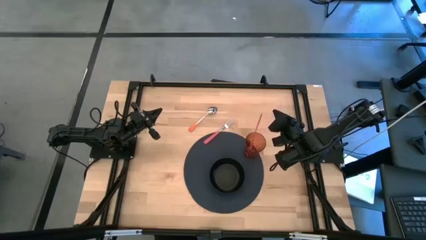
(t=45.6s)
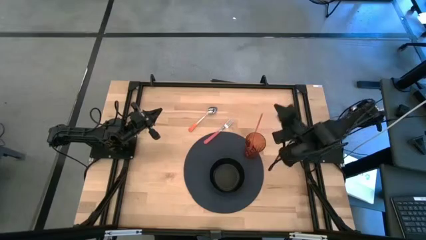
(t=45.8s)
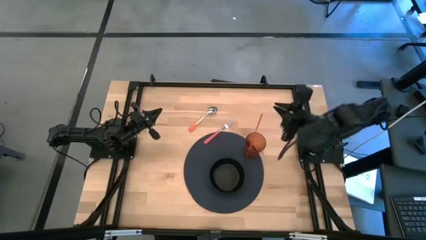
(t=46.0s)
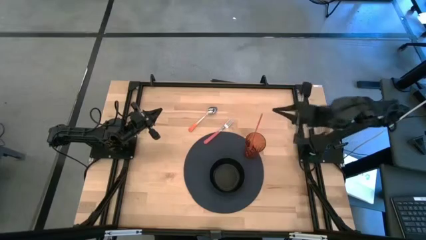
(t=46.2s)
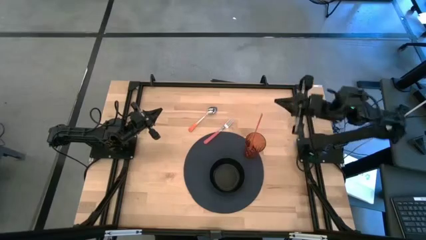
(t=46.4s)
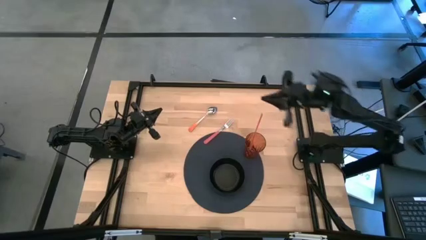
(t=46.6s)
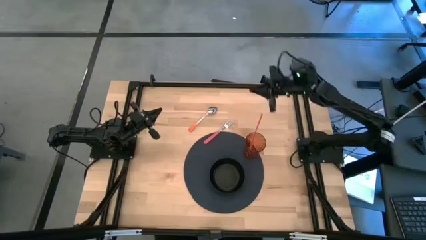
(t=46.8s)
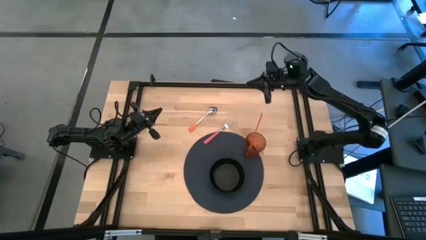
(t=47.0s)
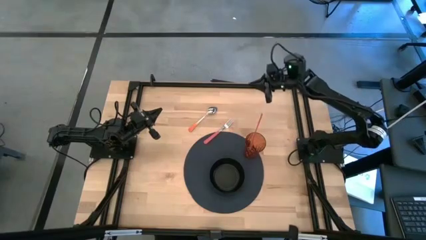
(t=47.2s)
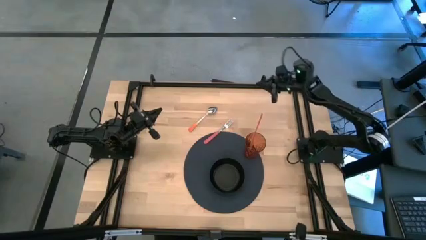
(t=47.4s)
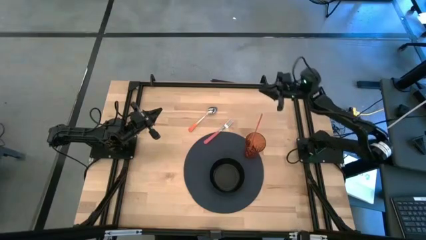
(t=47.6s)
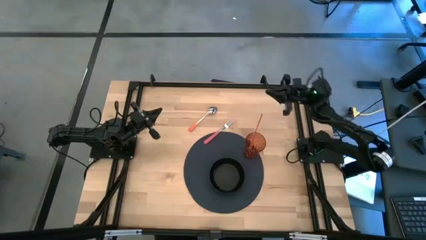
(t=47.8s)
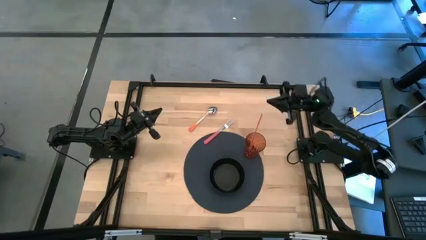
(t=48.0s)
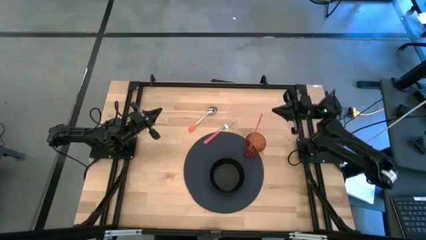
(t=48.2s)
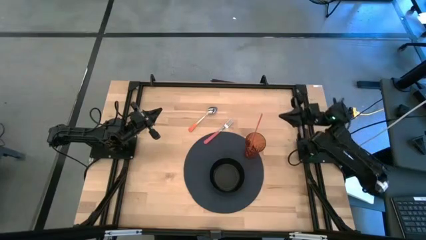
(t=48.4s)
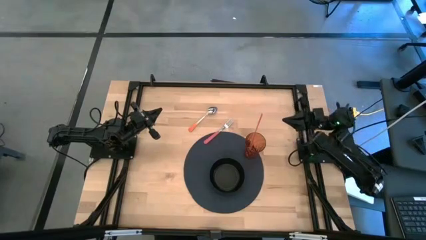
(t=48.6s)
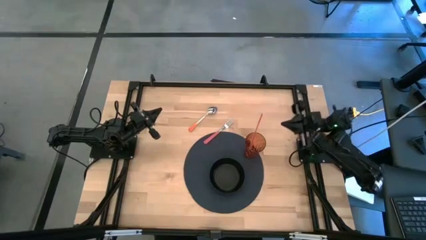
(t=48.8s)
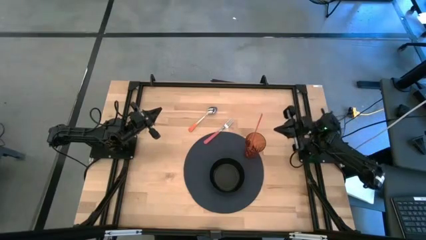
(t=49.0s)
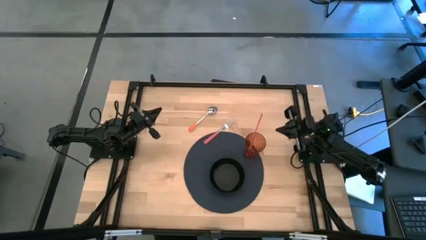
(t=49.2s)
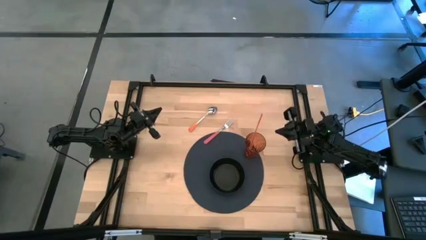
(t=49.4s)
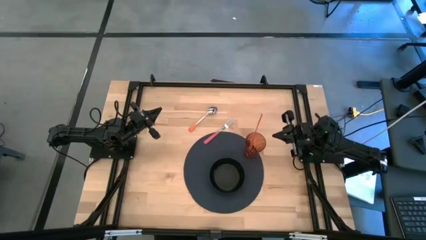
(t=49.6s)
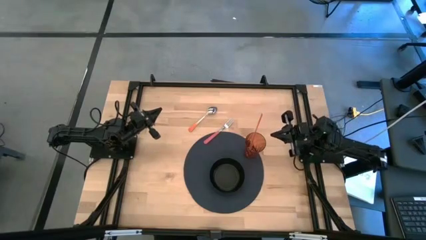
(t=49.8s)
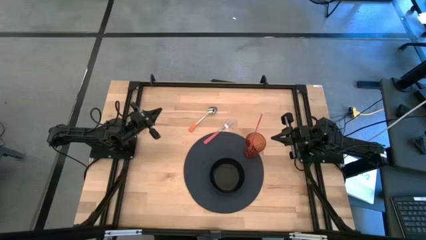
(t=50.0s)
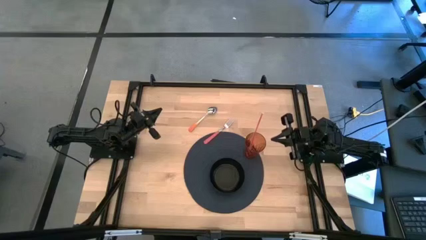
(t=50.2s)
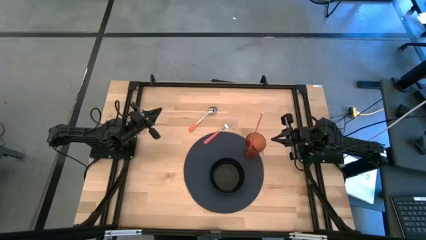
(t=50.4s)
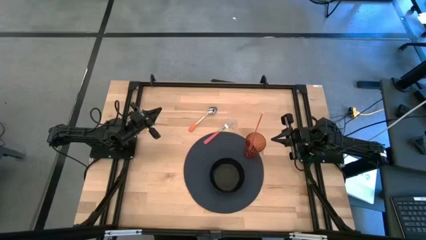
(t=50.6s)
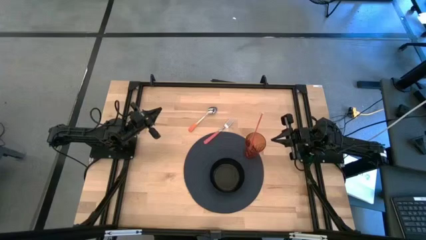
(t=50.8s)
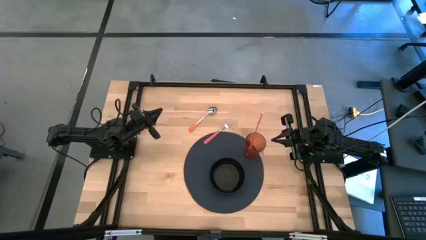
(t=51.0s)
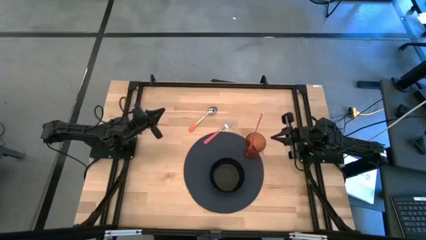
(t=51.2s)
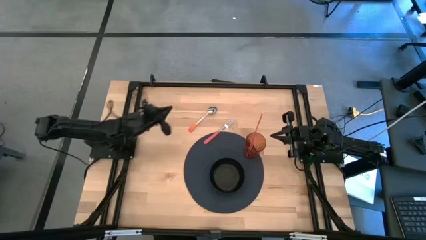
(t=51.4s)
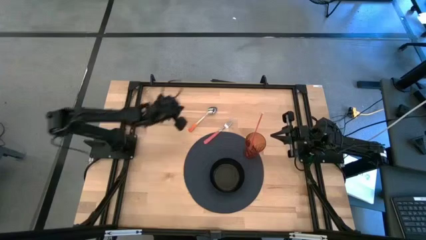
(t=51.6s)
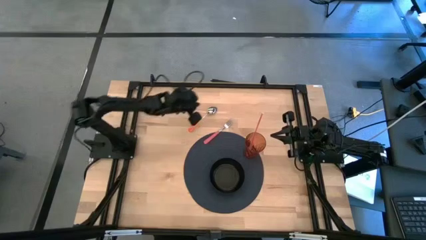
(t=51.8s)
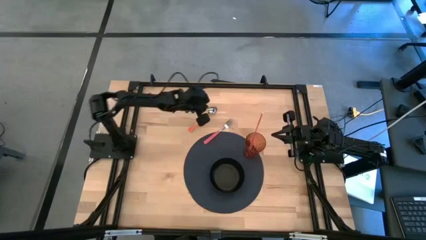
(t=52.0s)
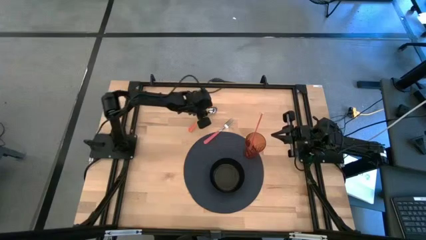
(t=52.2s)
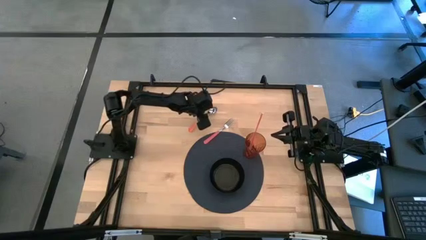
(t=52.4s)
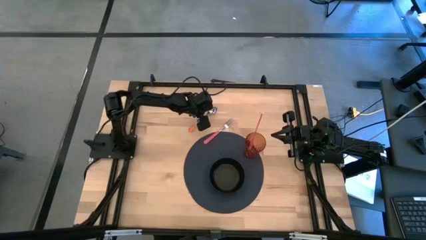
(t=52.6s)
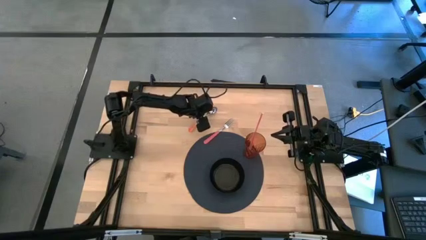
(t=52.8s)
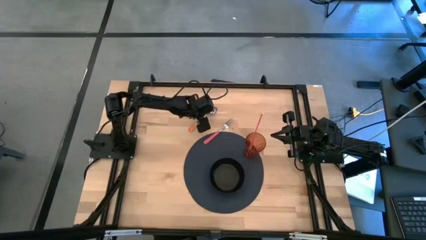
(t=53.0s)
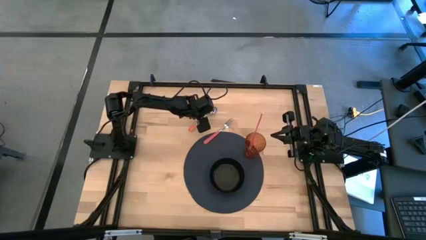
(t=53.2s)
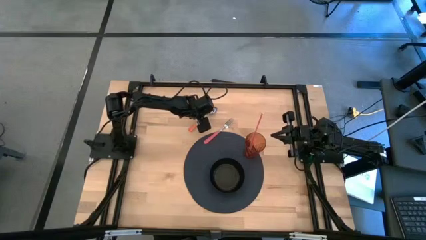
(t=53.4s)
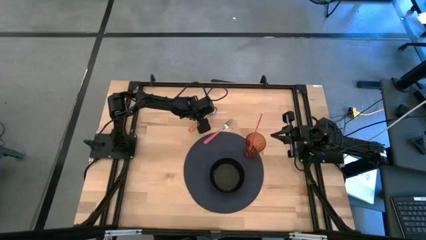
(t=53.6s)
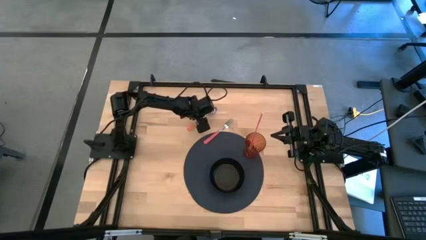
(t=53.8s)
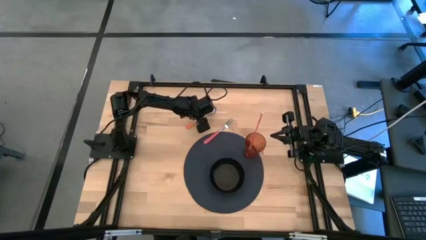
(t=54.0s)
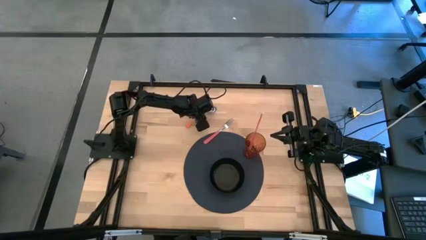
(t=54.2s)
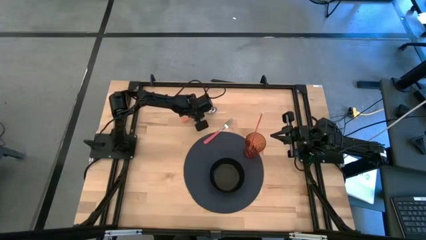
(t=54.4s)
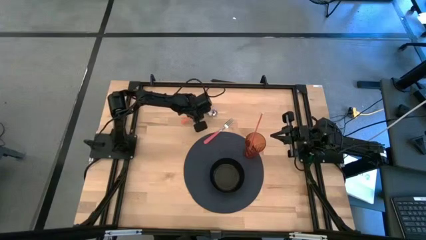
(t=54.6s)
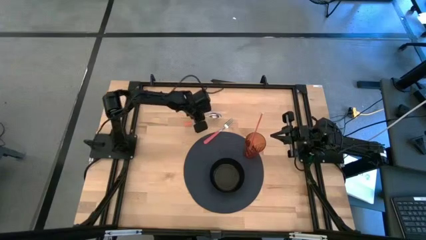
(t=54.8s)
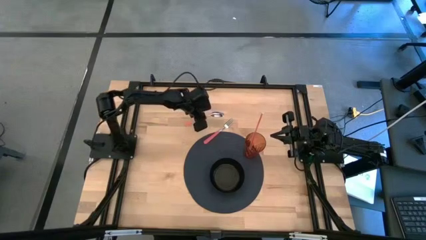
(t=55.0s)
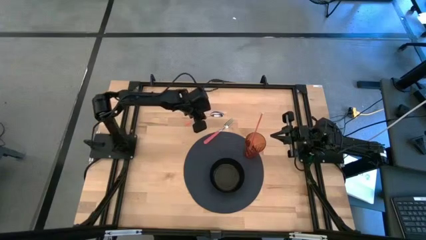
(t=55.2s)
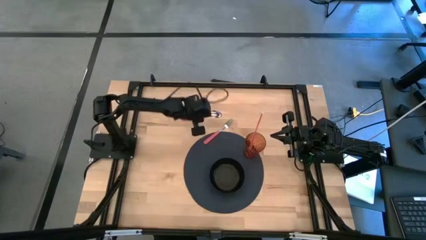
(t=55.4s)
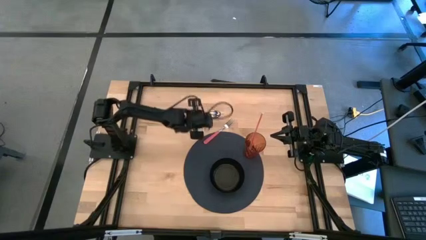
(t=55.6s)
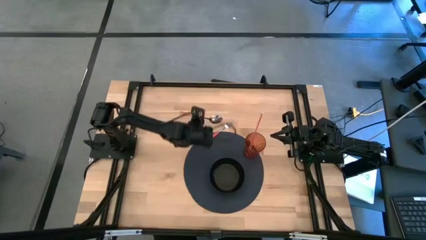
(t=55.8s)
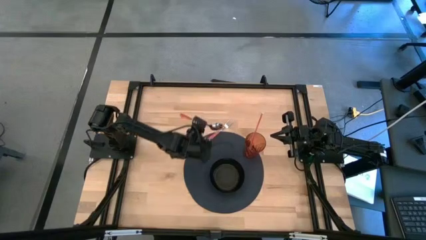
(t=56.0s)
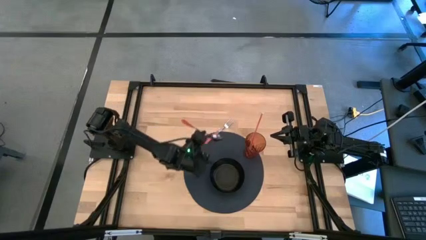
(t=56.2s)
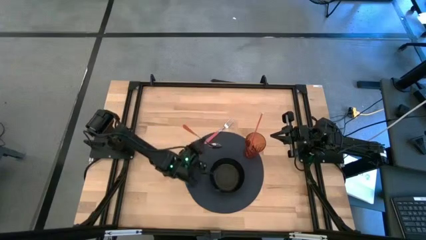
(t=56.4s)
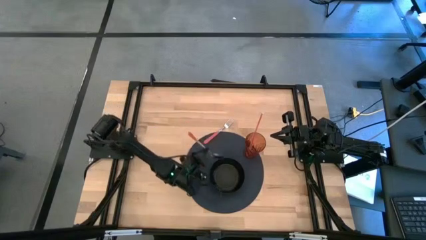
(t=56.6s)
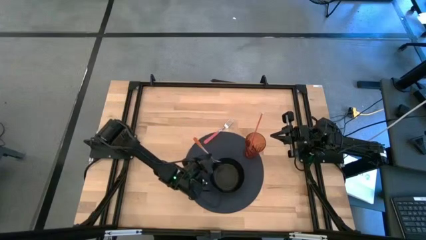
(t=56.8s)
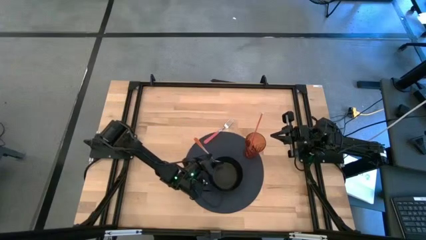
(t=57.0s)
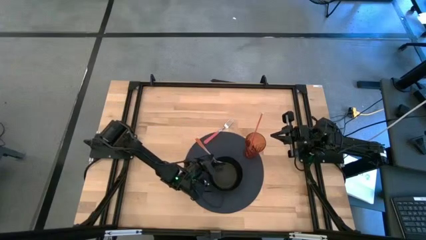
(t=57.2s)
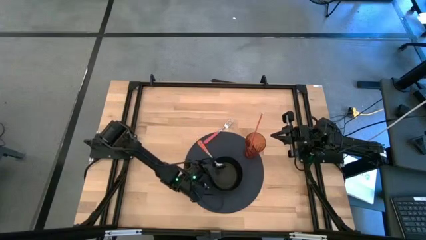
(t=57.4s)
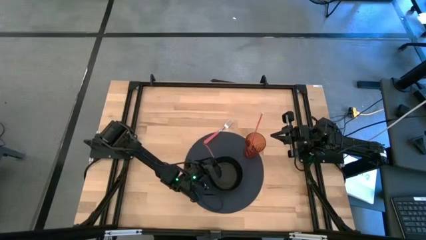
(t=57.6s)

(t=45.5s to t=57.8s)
Task: Pick & Place Utensil
Put the orange spoon into the black bowl on the blue mat
